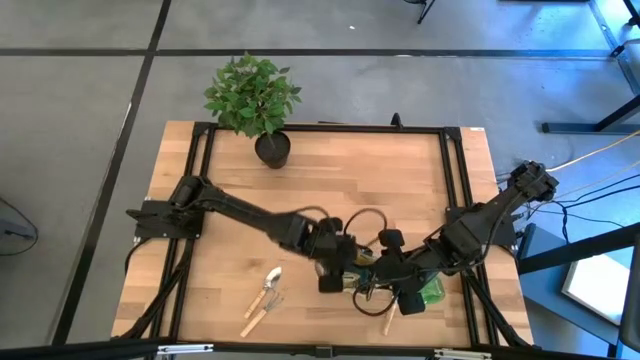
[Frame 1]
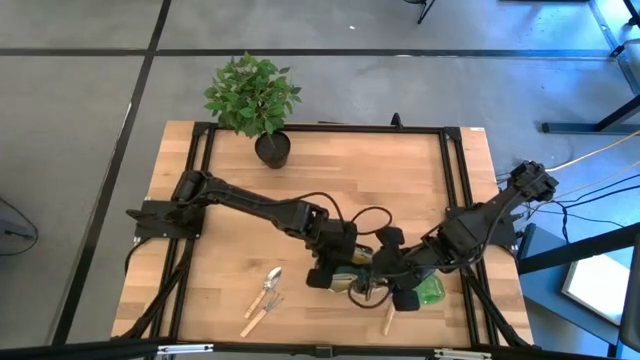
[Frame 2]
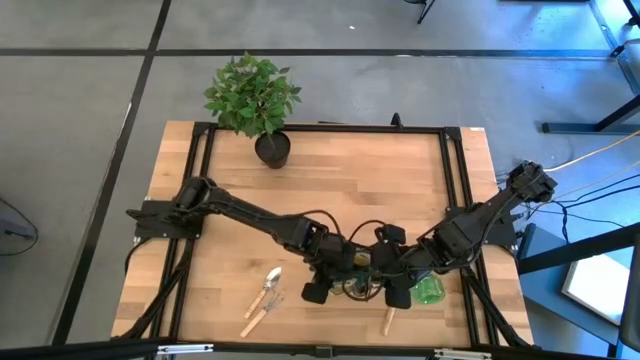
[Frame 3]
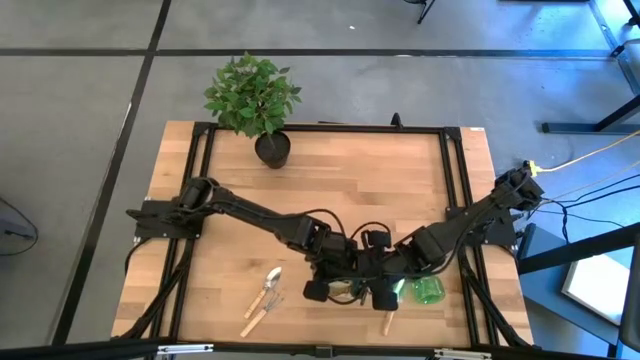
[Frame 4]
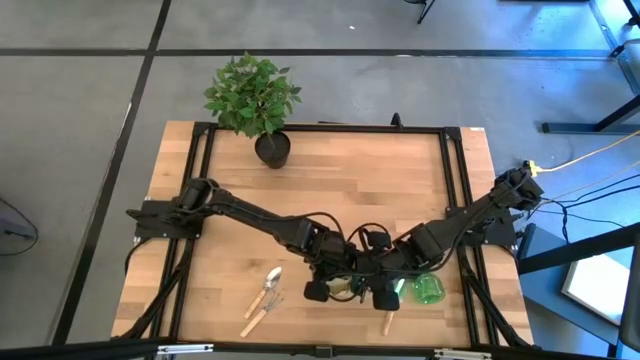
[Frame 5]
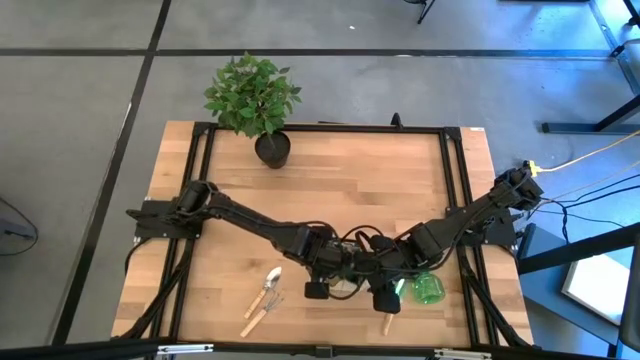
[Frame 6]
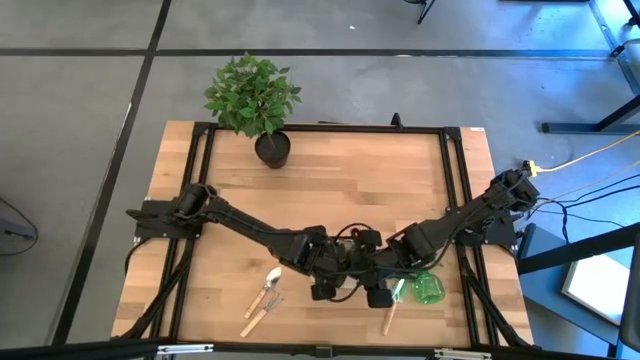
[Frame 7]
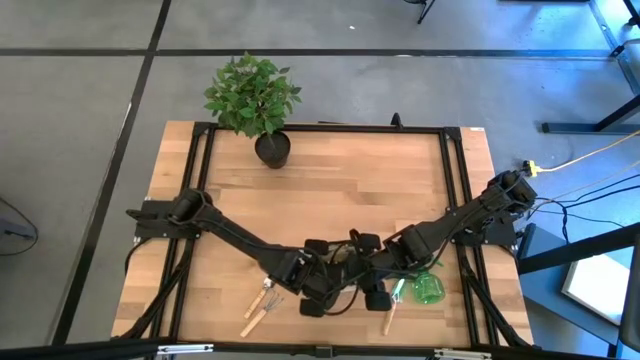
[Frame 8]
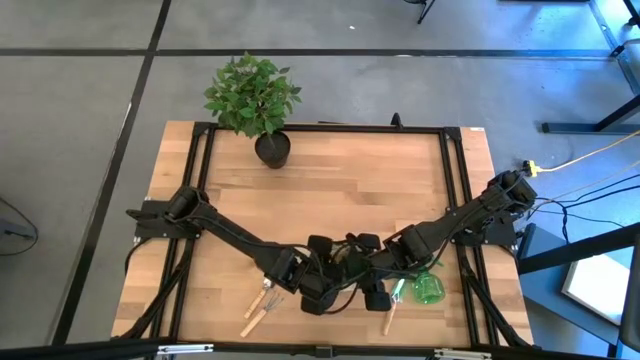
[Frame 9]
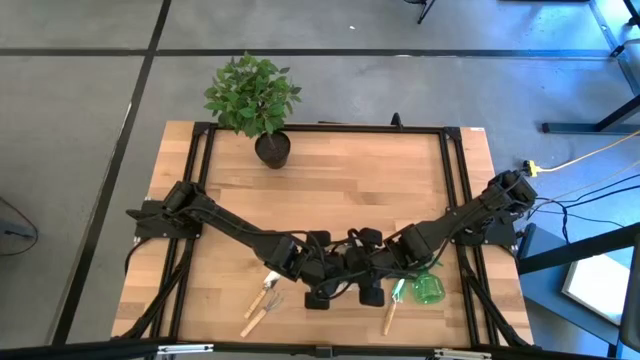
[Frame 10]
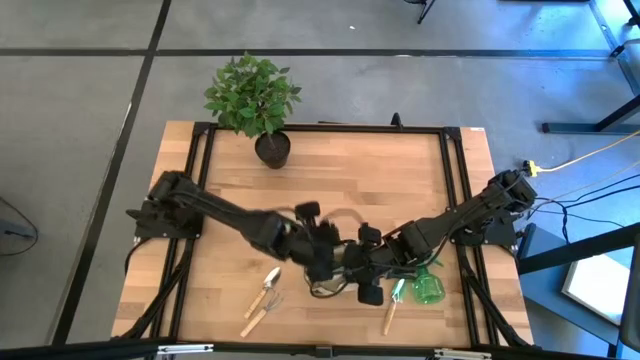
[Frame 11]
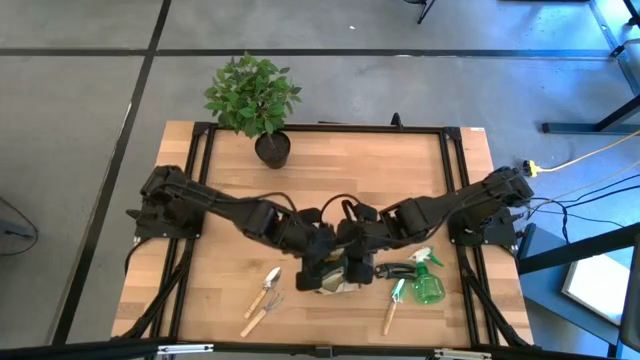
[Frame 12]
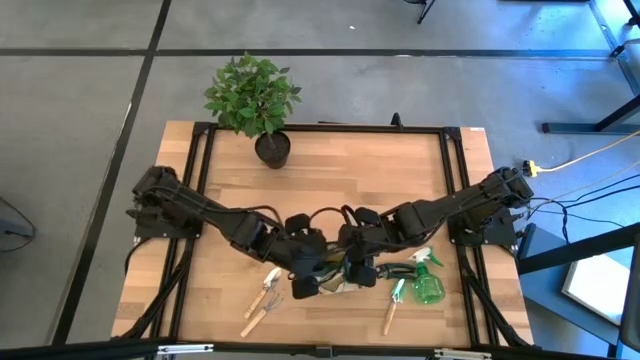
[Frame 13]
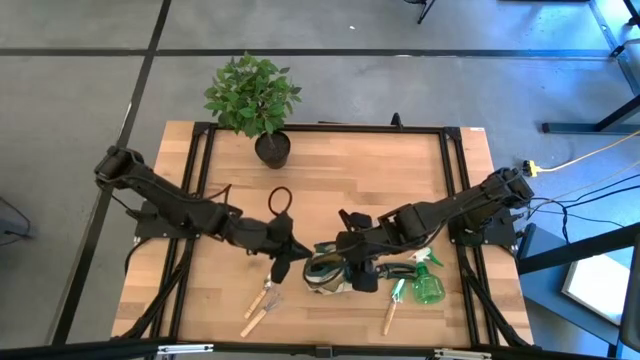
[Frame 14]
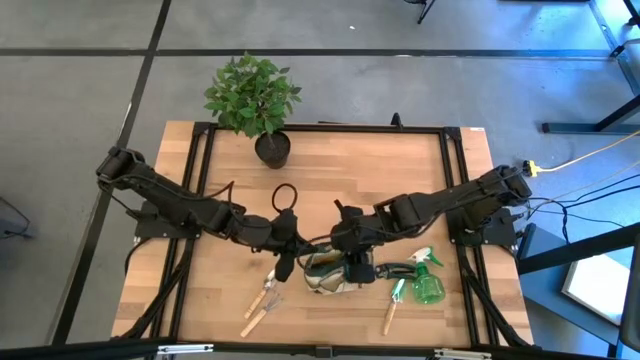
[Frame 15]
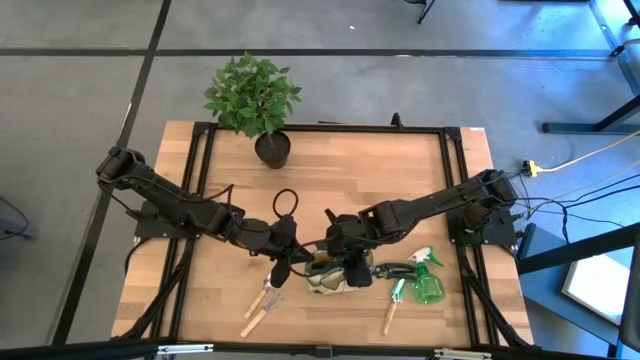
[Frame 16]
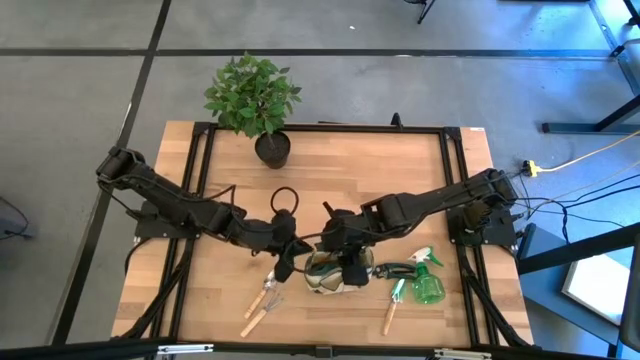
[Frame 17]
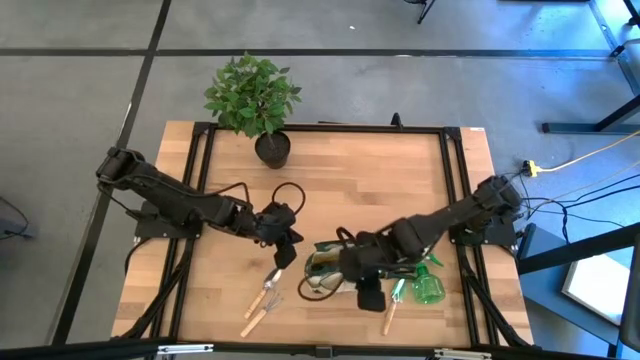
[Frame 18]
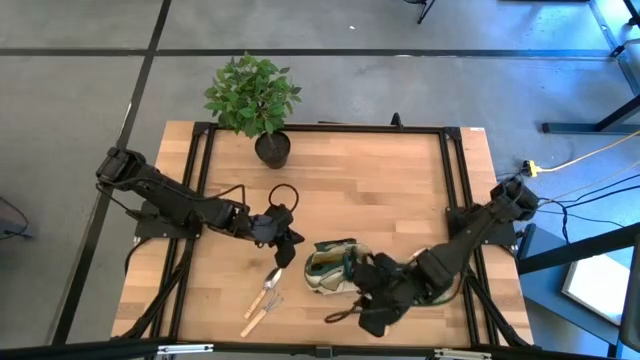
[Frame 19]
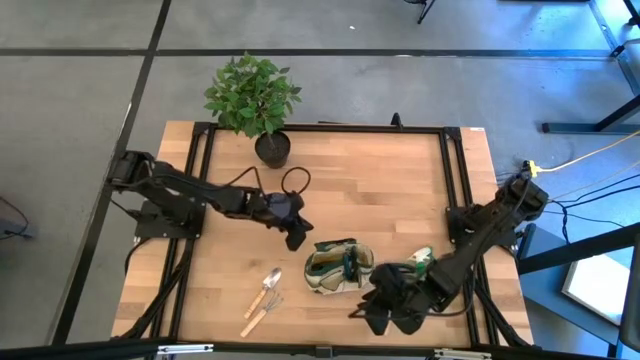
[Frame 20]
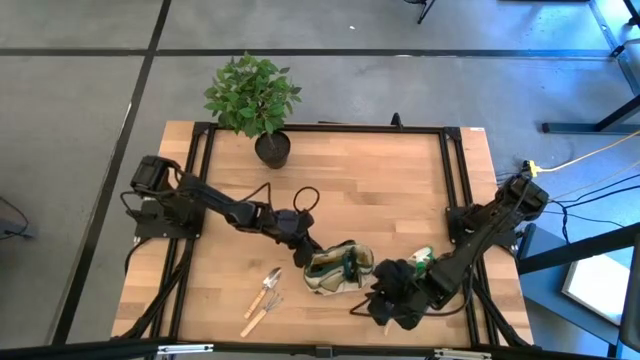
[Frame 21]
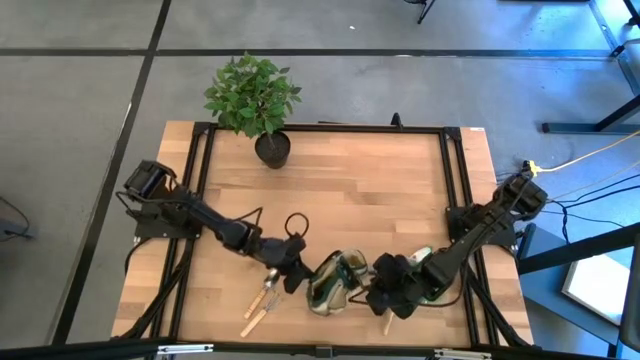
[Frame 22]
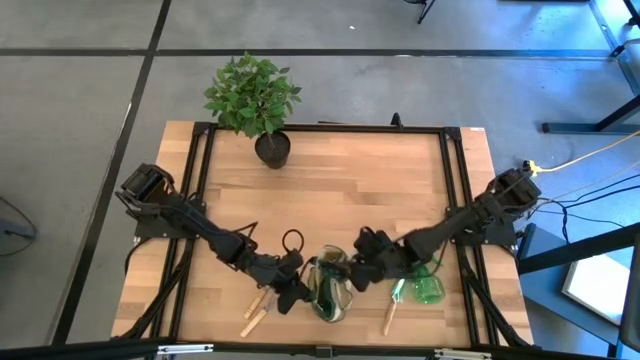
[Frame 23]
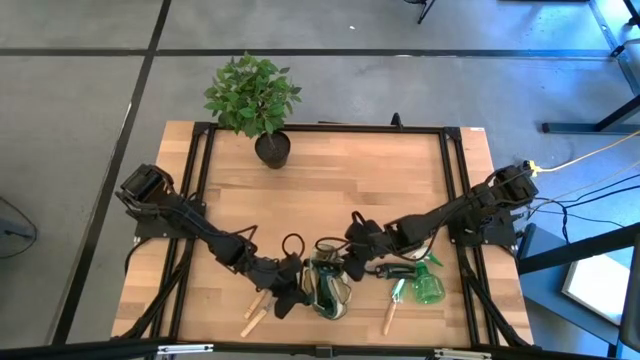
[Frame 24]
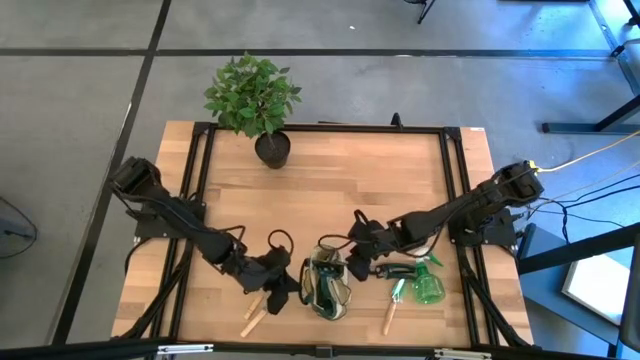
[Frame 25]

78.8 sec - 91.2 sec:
Task: Pick & Place Garden tools in Gardening bag
Adjust the brown gardening bag on the table

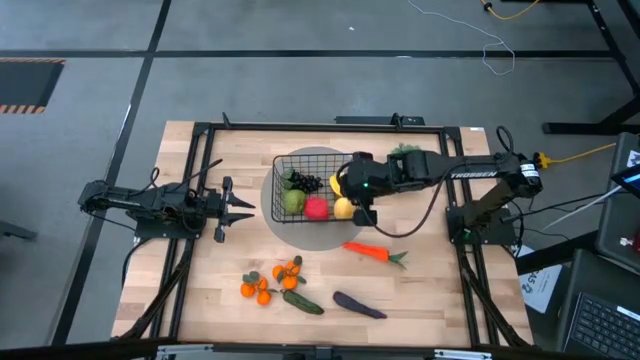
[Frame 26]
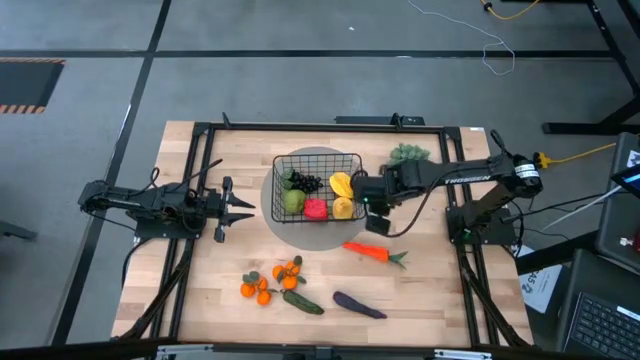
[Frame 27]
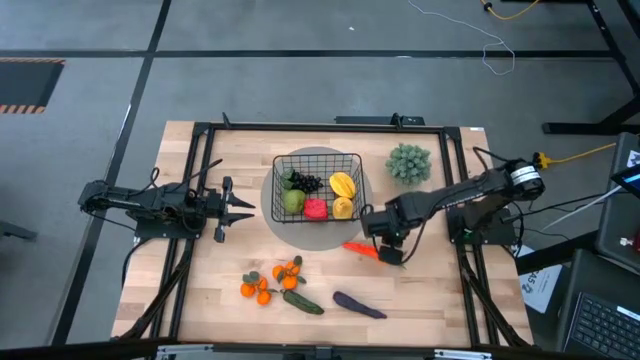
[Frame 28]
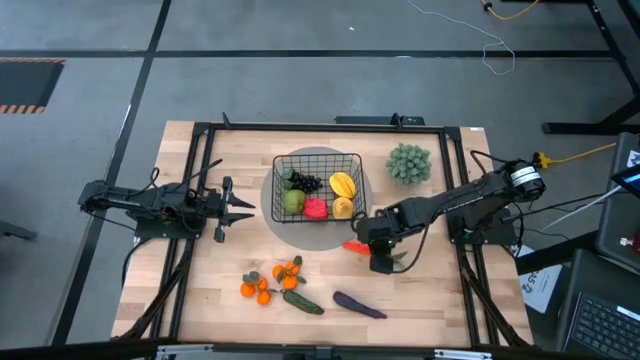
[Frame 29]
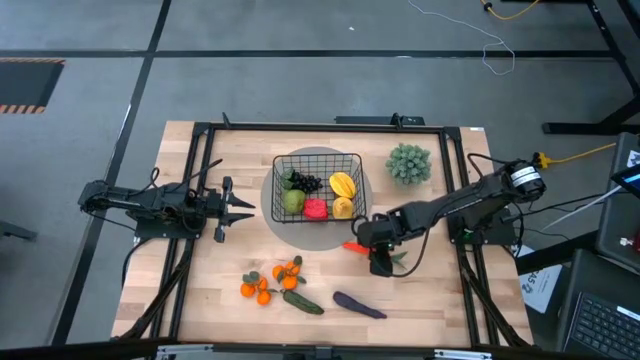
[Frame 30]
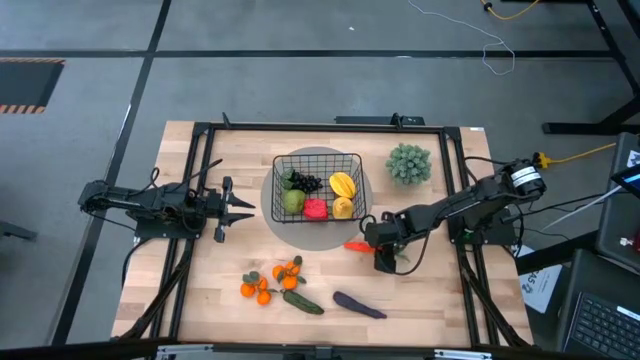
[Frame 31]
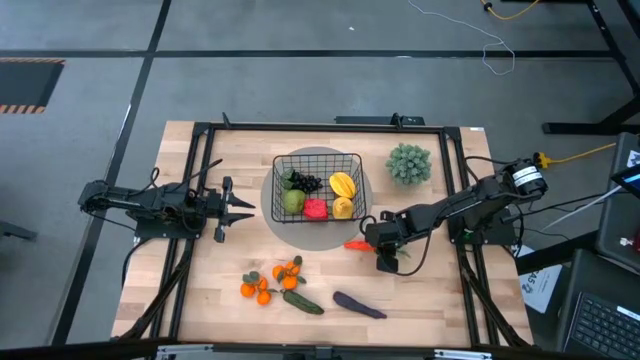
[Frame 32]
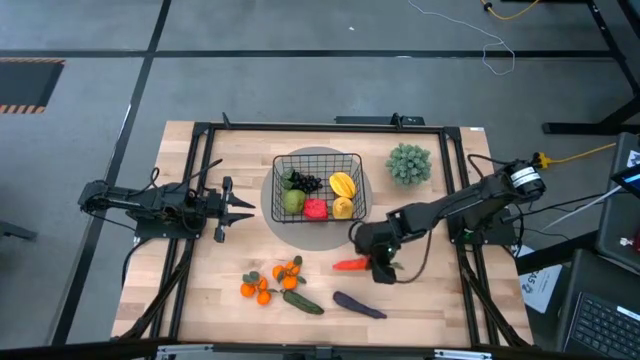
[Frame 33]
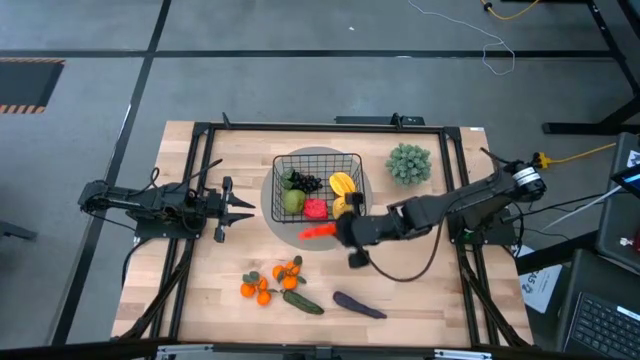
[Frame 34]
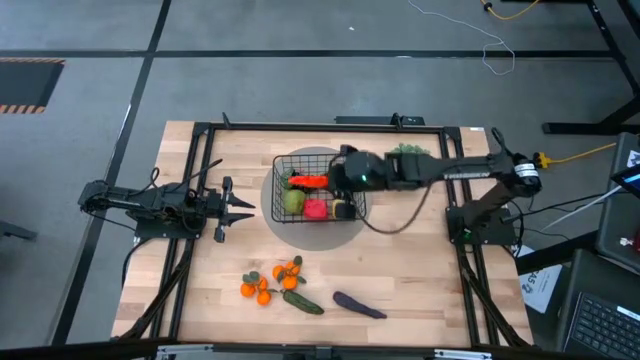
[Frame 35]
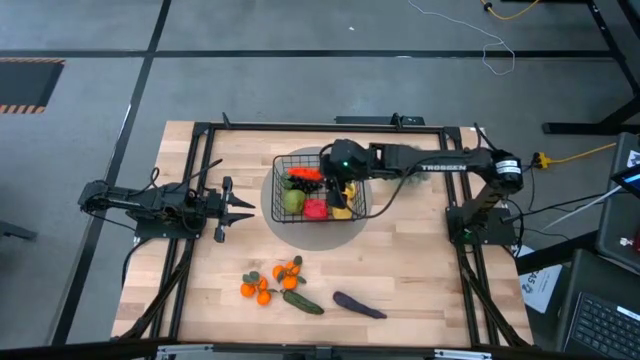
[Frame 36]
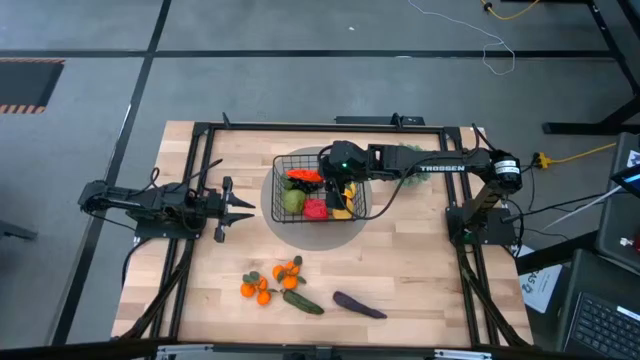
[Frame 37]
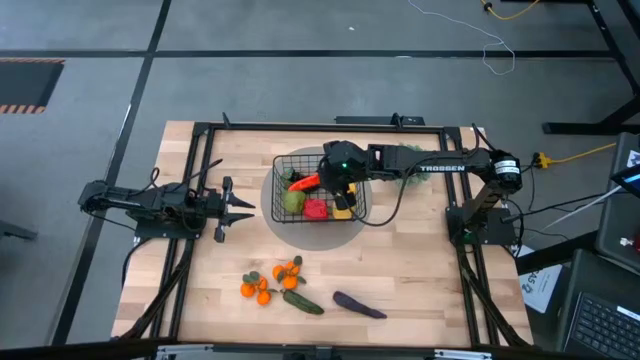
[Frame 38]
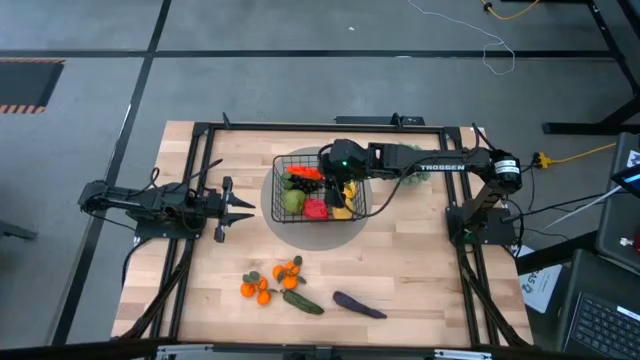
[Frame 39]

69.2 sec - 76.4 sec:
Task: Build produce basket
Put the orange carrot into the black wire basket

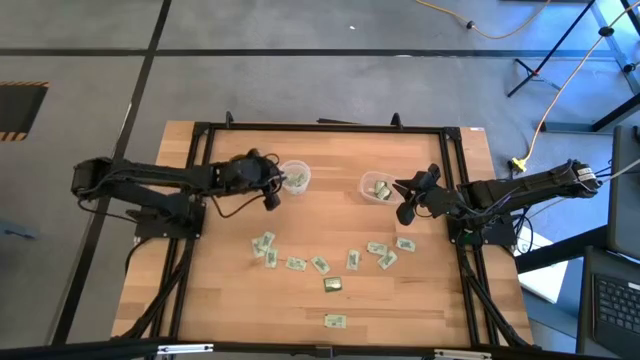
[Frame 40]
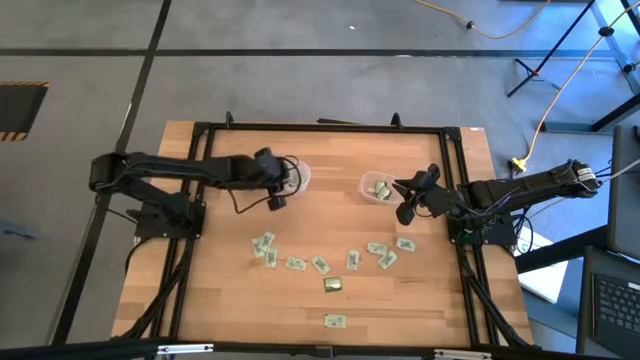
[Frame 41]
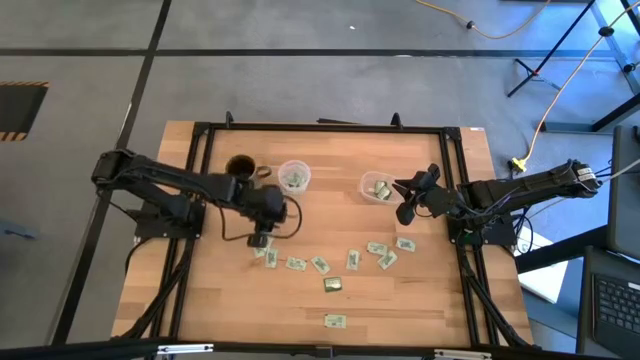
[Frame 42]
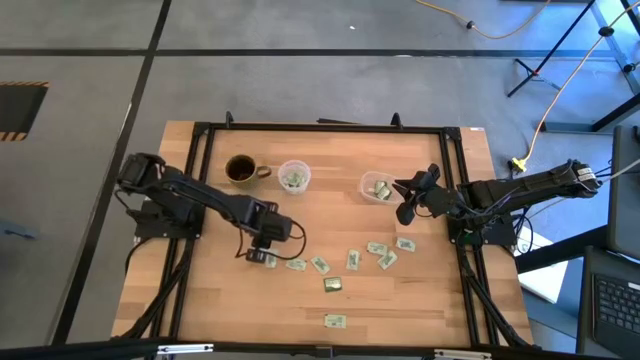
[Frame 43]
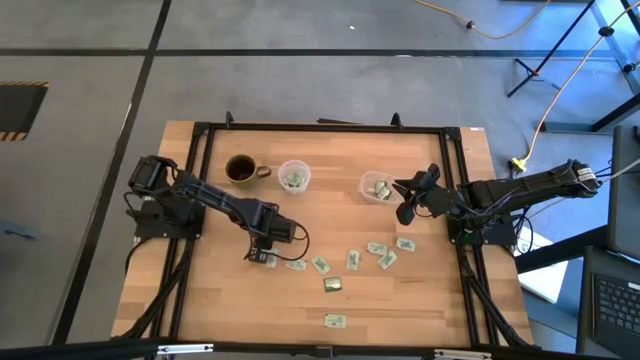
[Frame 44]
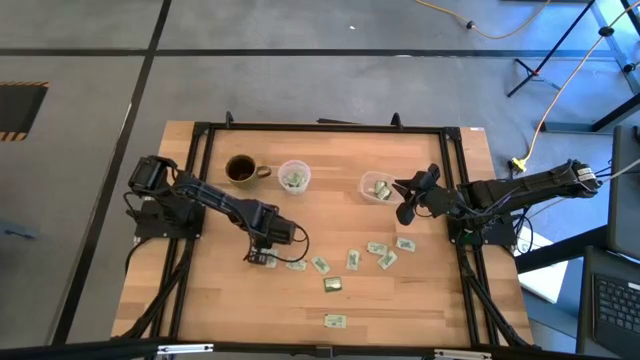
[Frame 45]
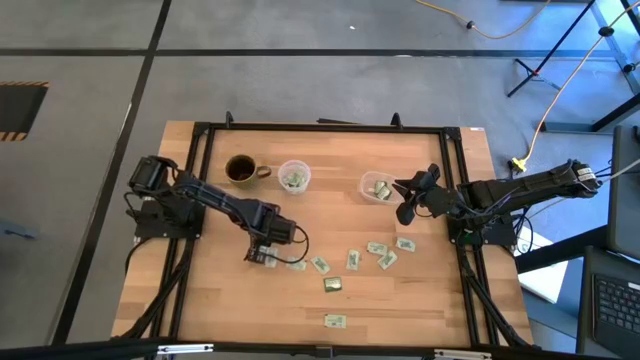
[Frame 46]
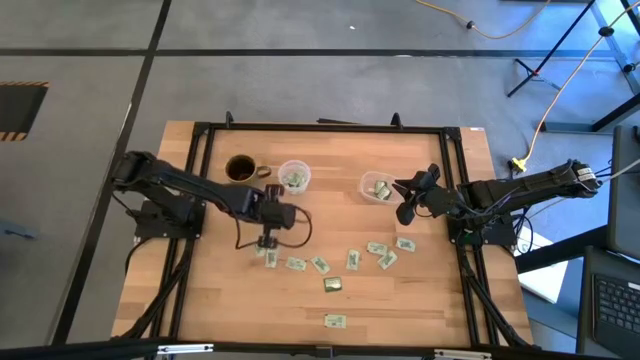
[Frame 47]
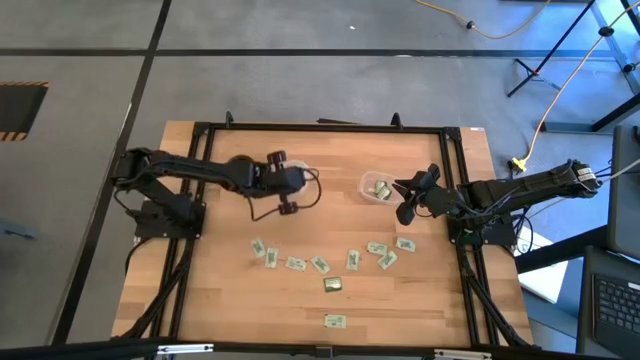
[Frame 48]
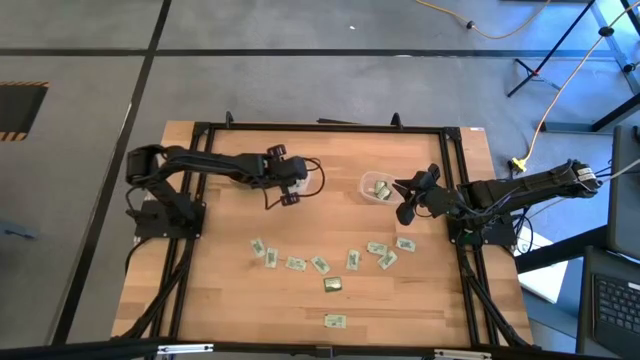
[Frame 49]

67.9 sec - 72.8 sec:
Task: Pick and place items into bin
Put the white stevia packet into the left transparent bin
